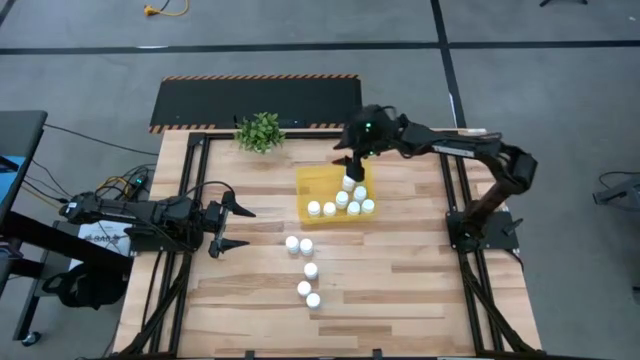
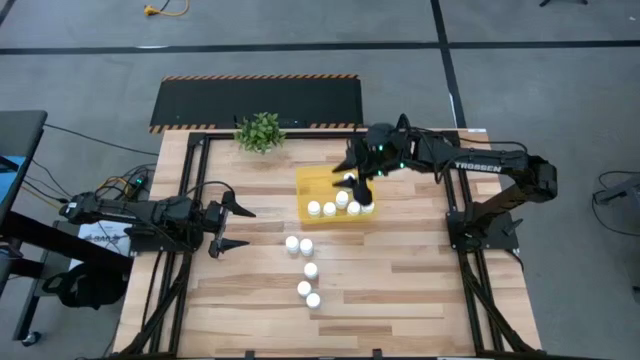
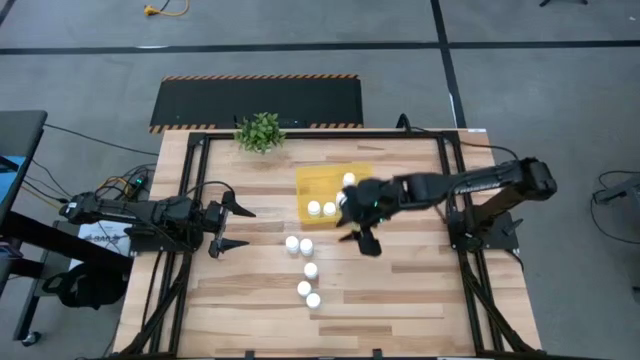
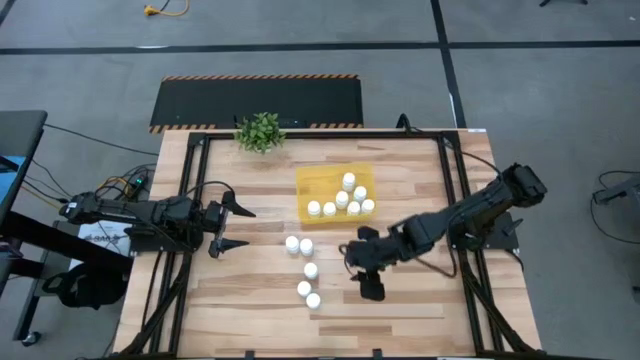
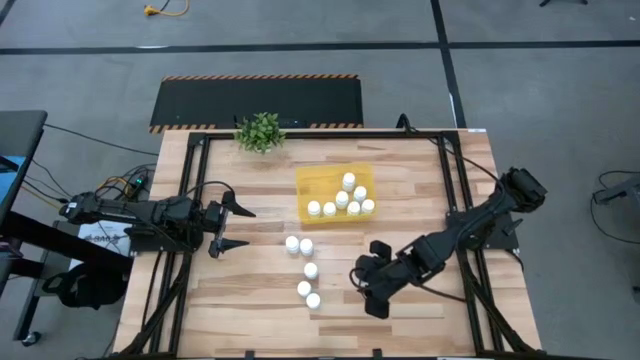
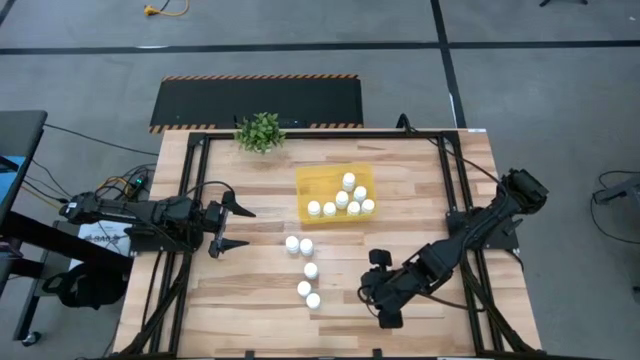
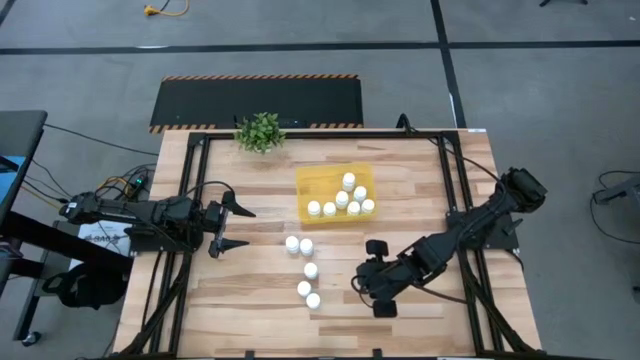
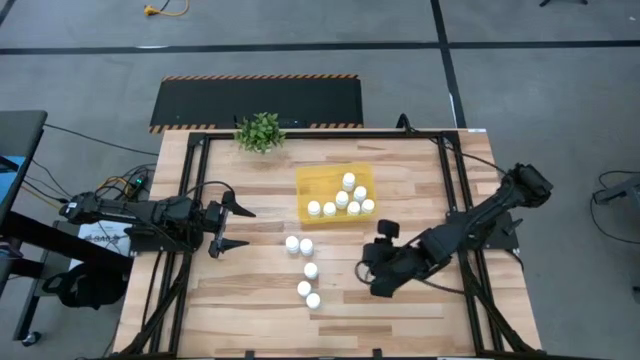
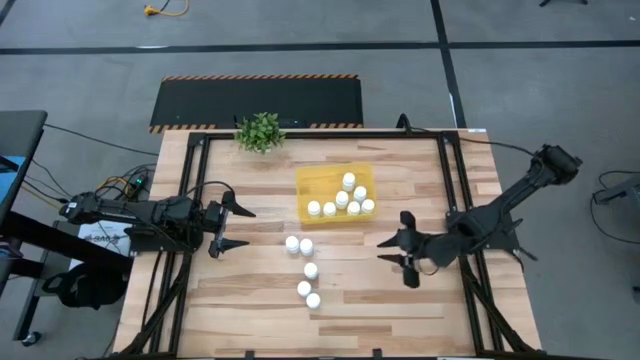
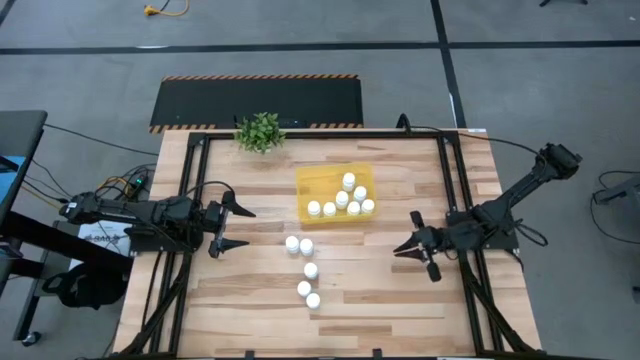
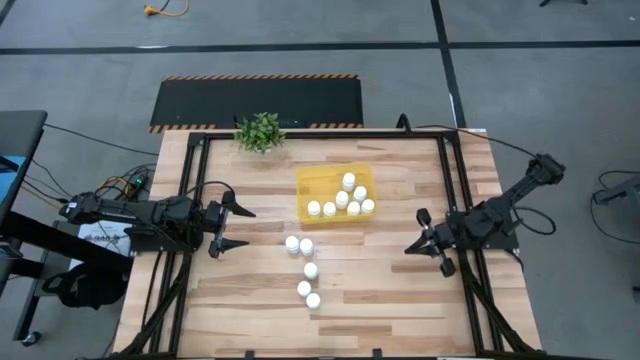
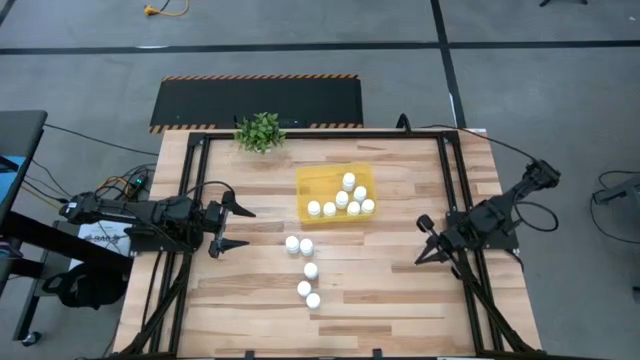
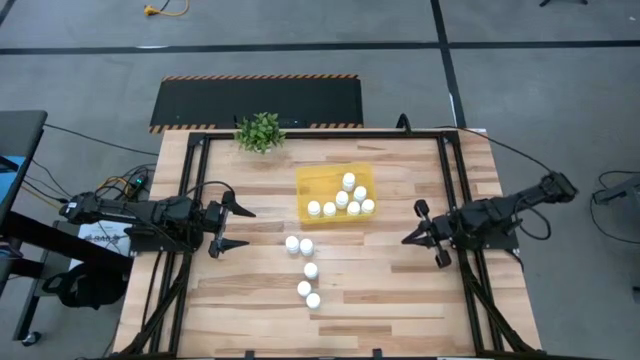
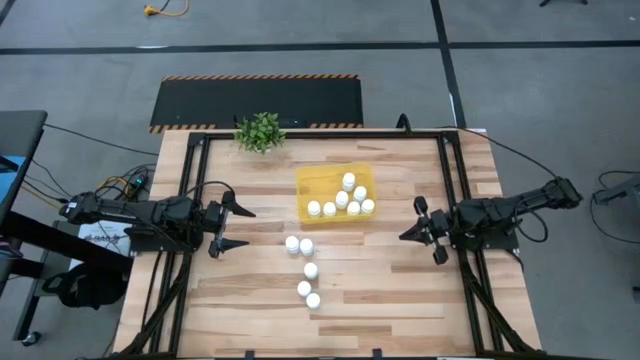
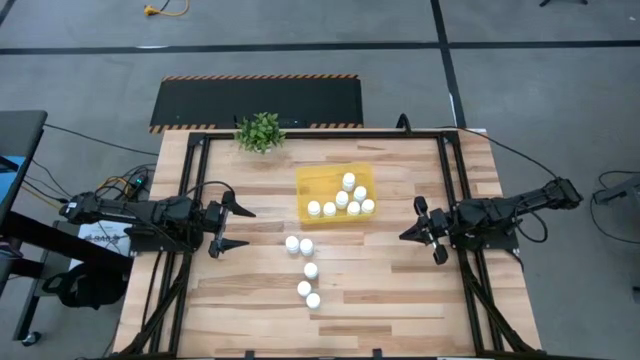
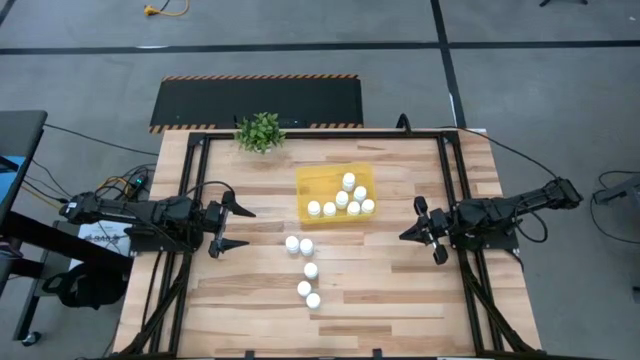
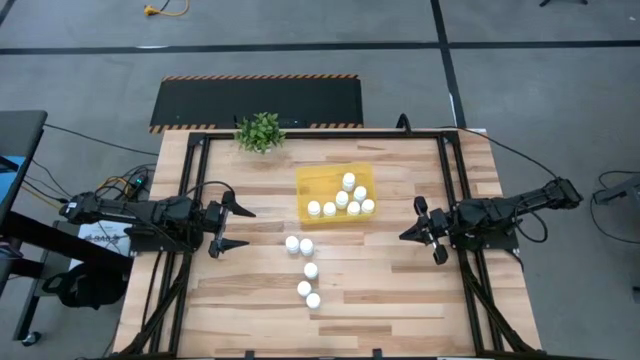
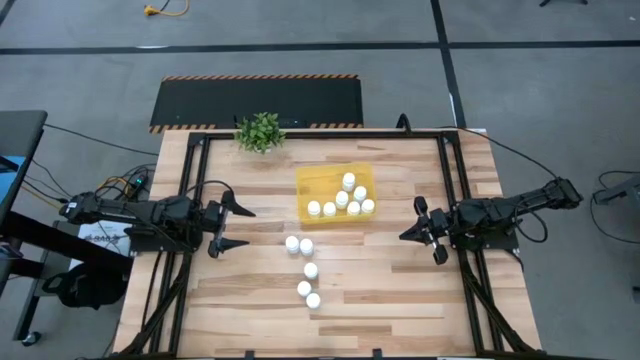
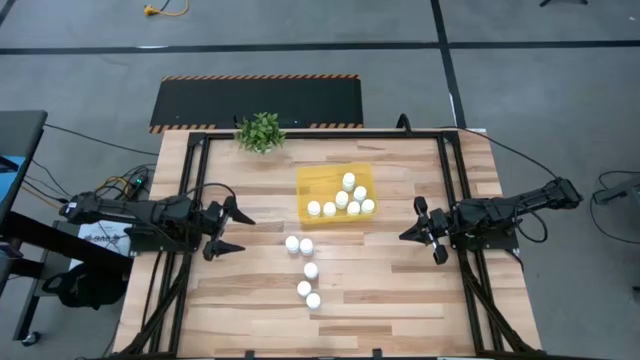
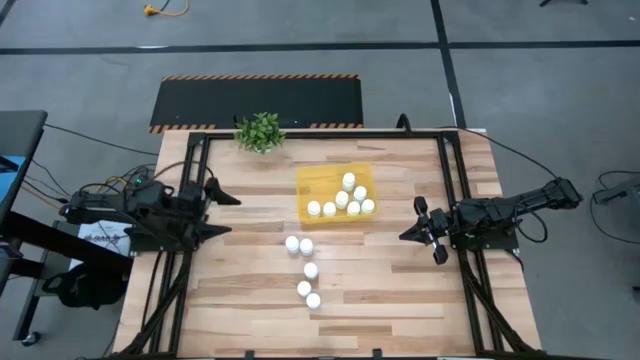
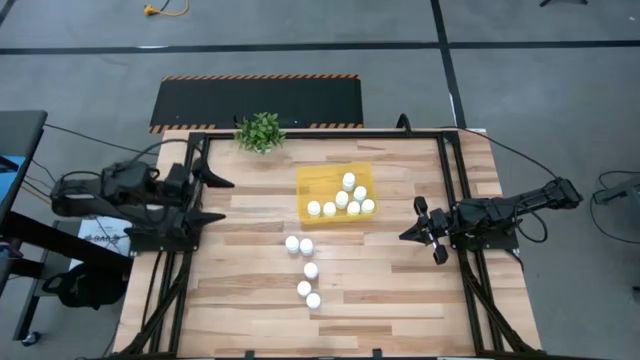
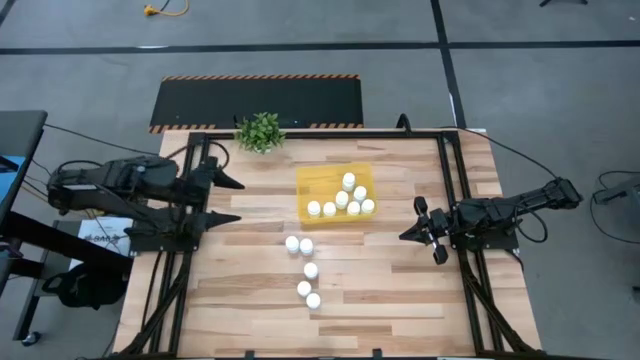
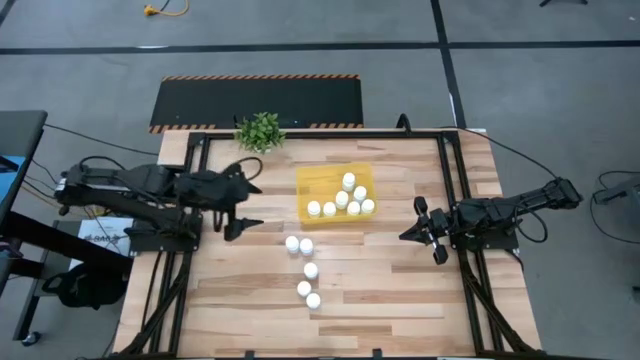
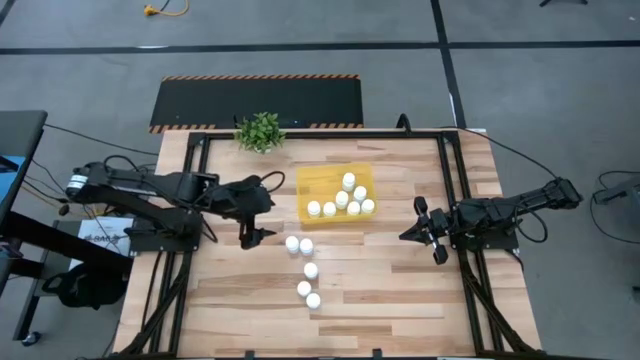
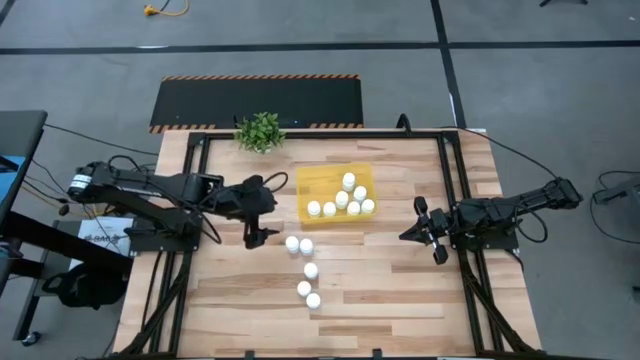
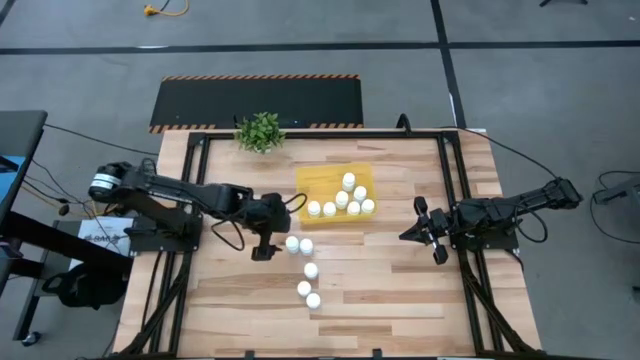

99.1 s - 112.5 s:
Task: Pick and place pill bottles into a basket
Put the white medicine bottle into the yellow bin

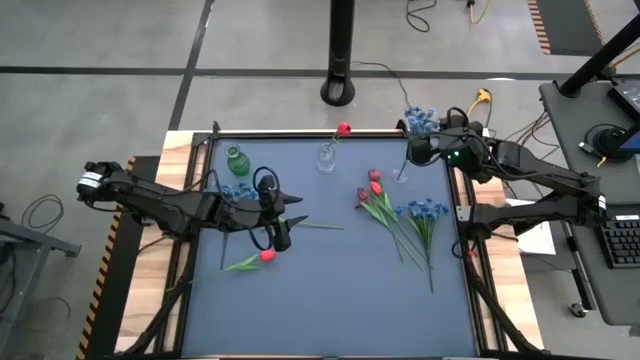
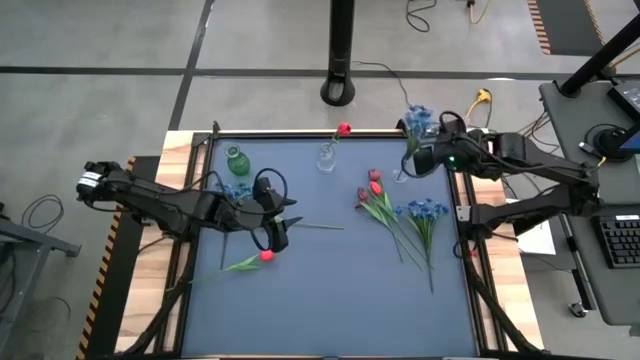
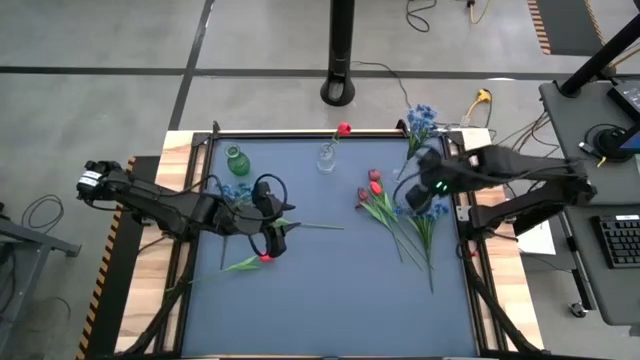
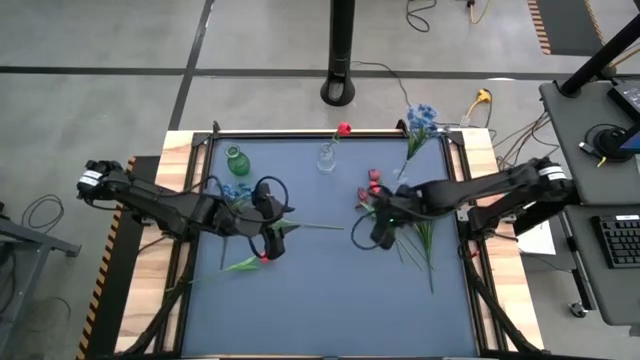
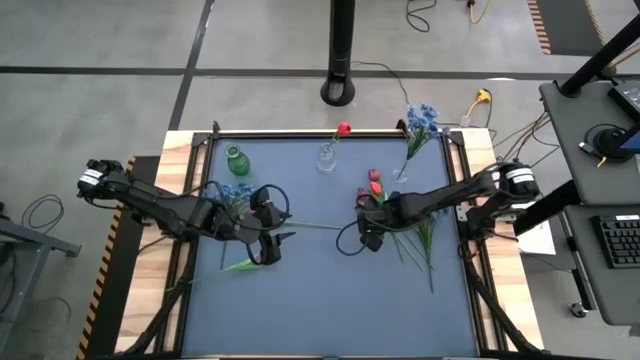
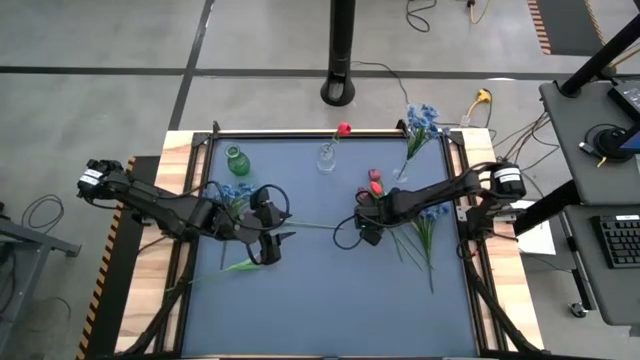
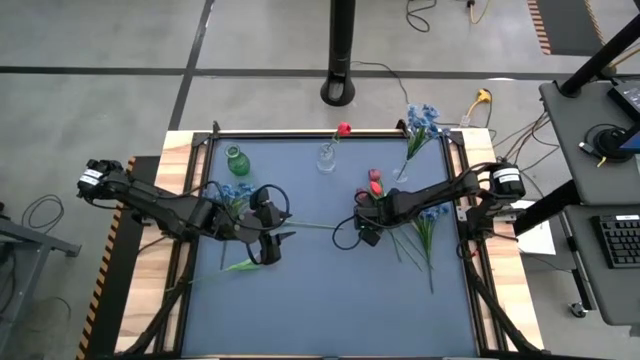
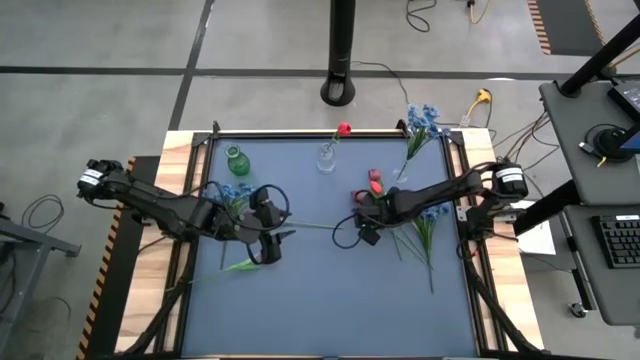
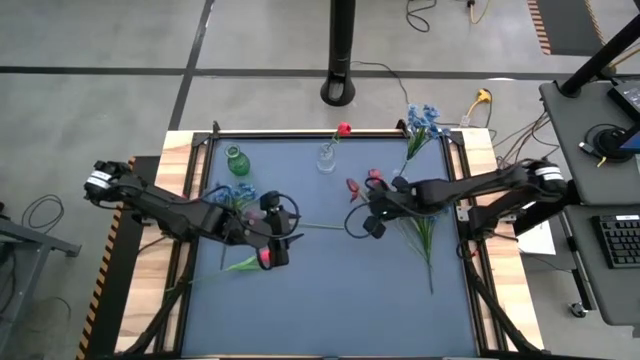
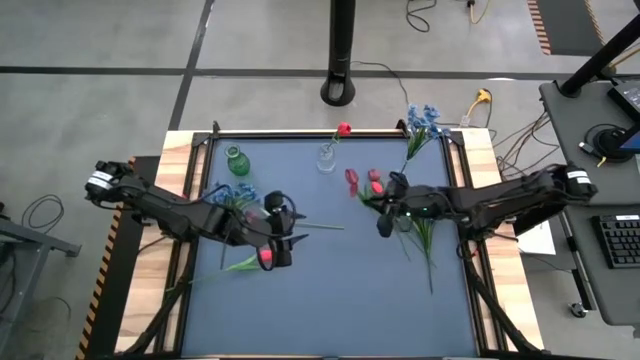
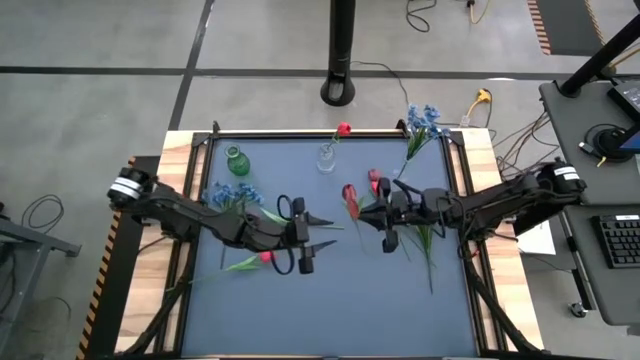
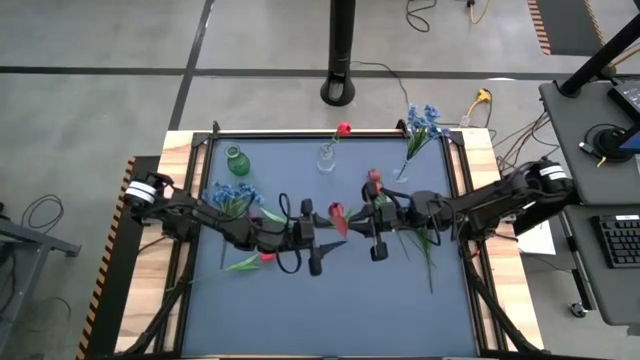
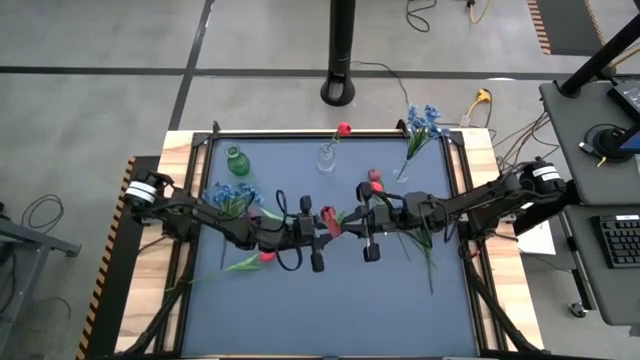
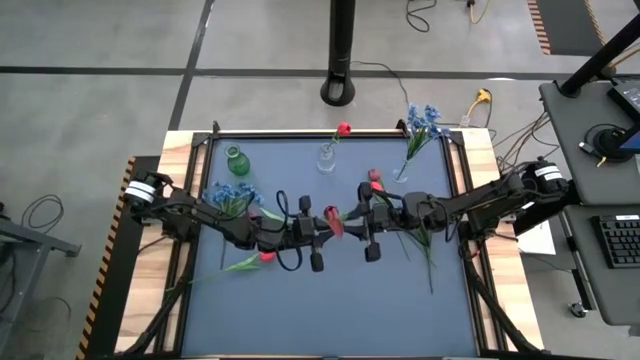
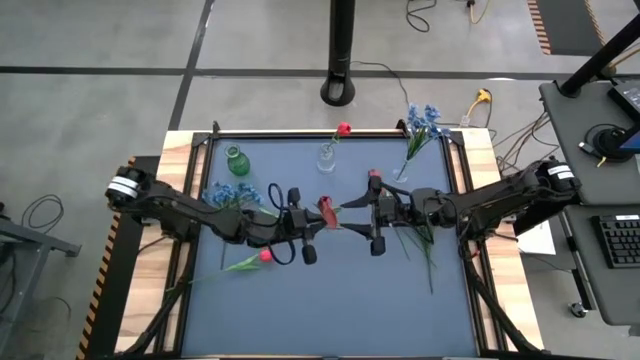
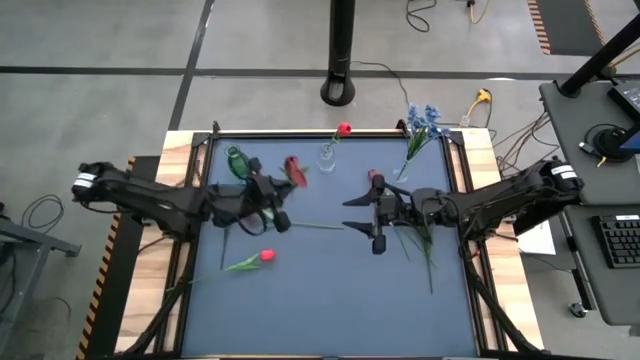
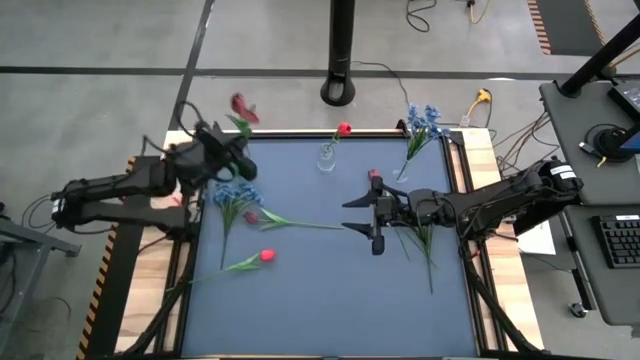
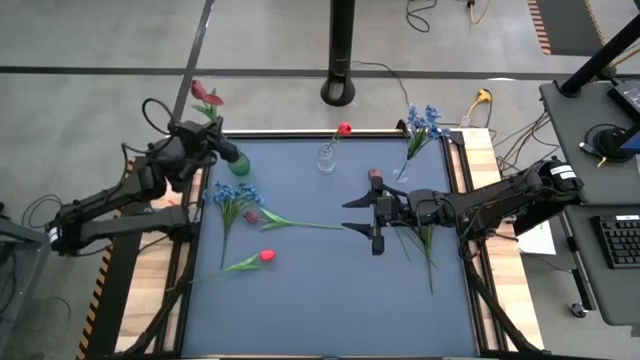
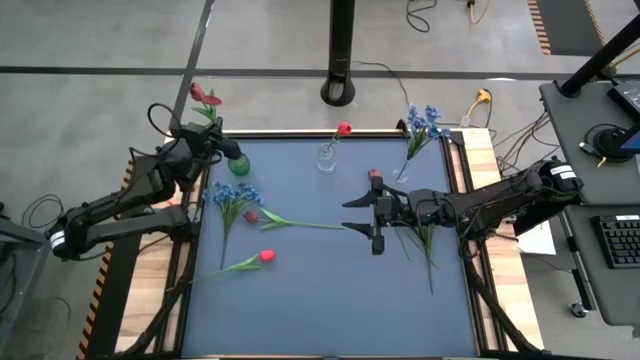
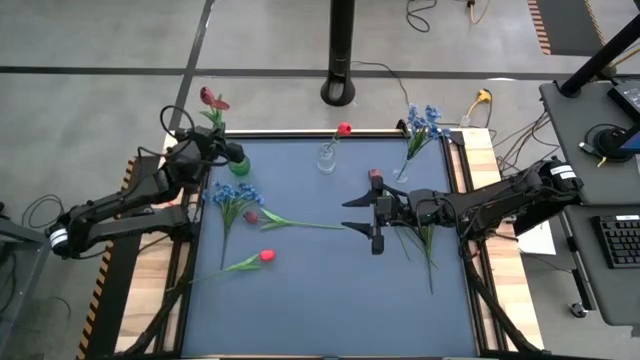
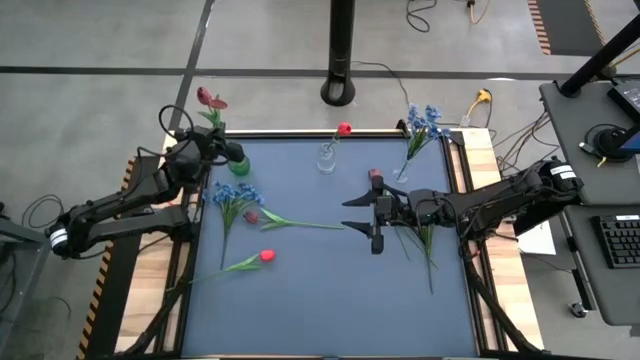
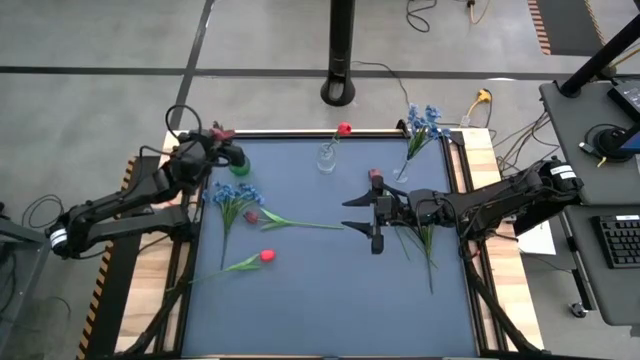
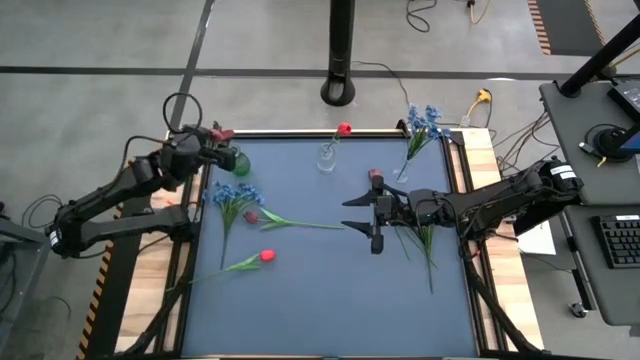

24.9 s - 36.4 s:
Task: Sort flowers into vase by color
Put the center dark red flower into the green vase
